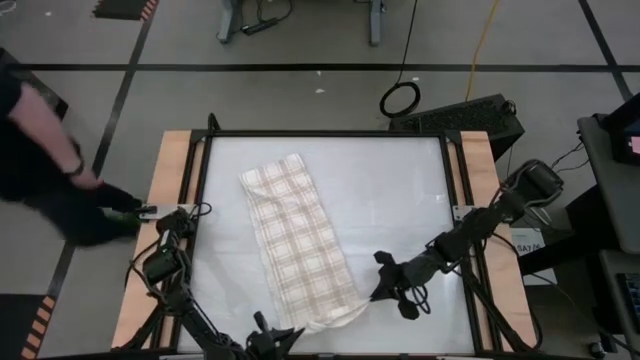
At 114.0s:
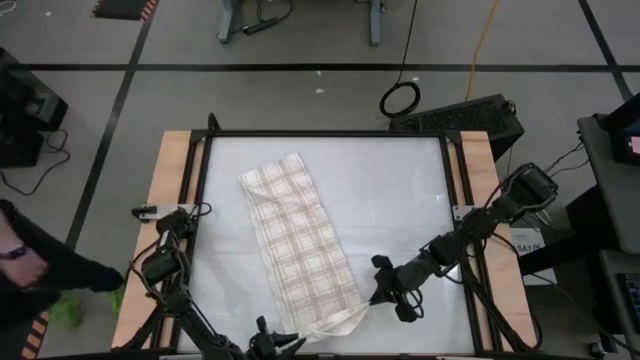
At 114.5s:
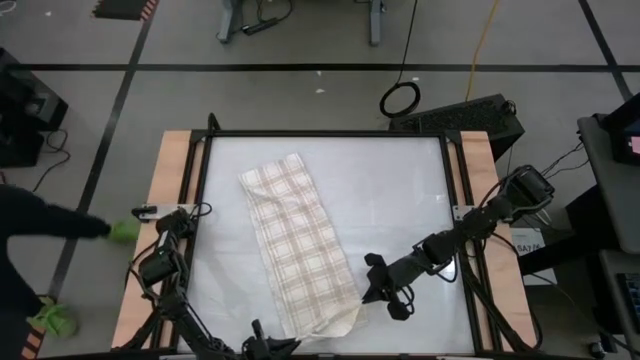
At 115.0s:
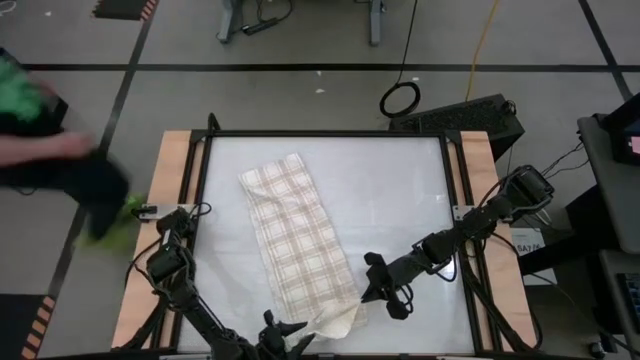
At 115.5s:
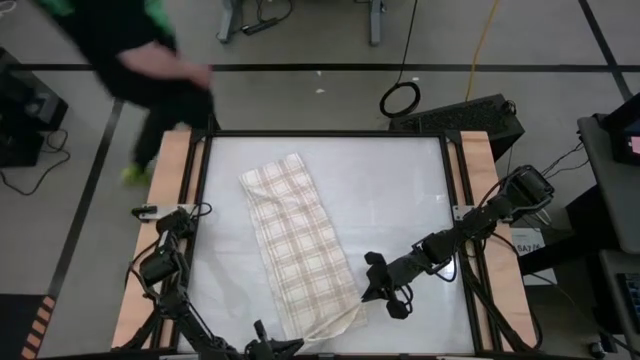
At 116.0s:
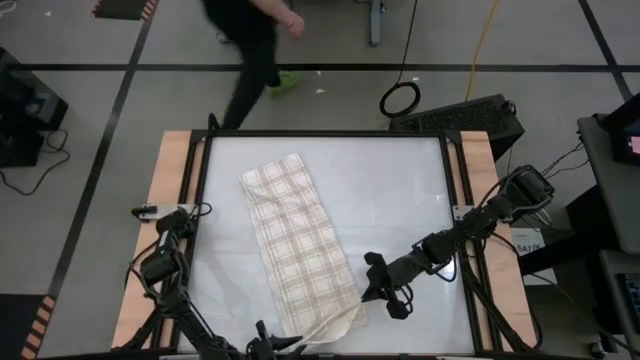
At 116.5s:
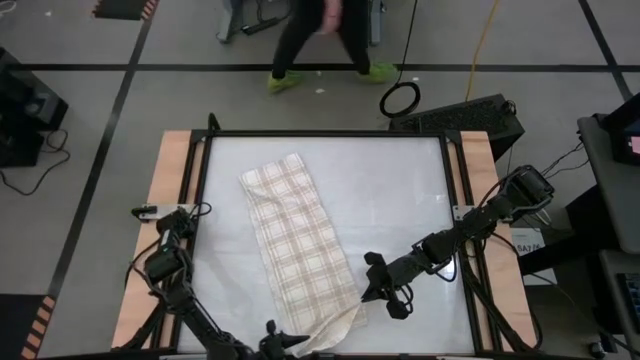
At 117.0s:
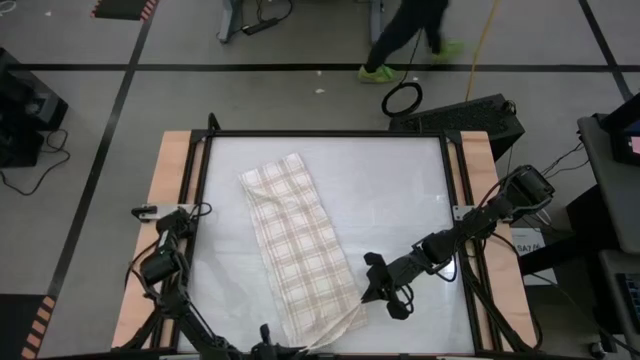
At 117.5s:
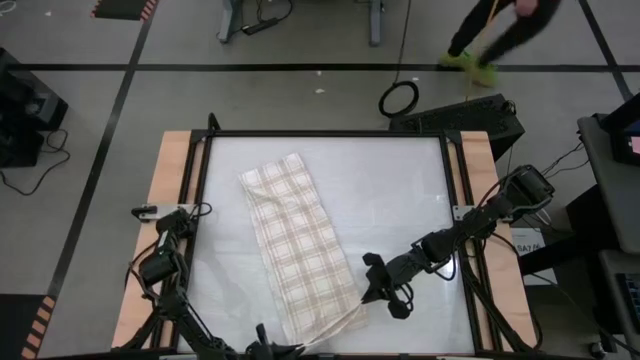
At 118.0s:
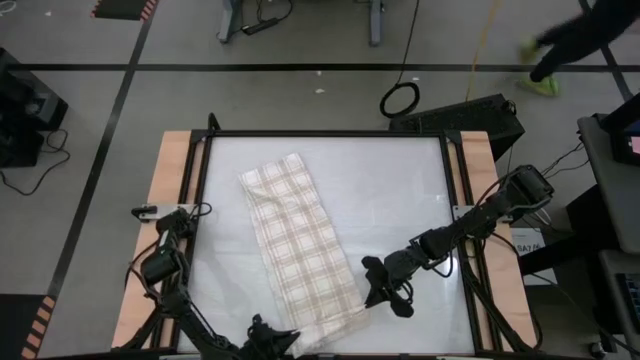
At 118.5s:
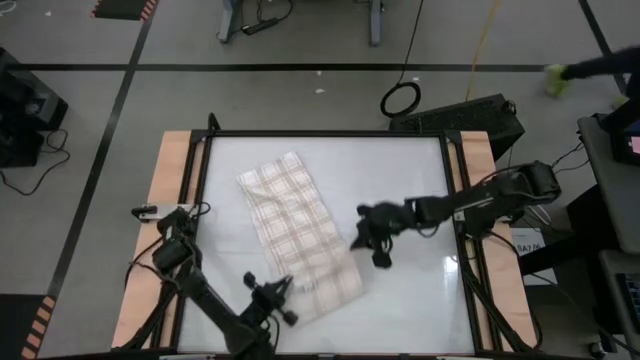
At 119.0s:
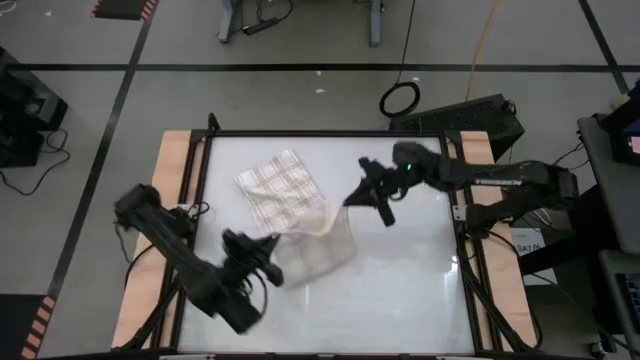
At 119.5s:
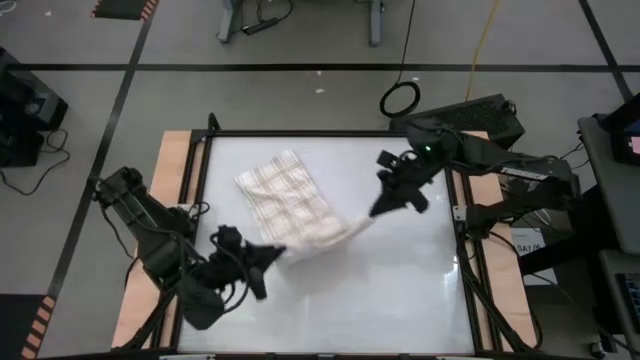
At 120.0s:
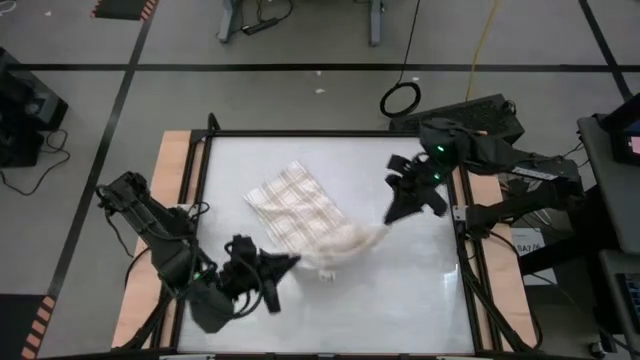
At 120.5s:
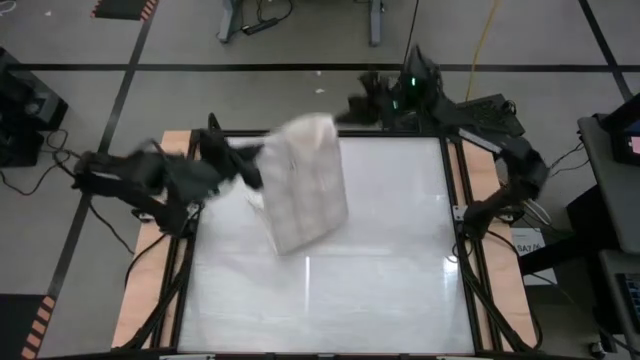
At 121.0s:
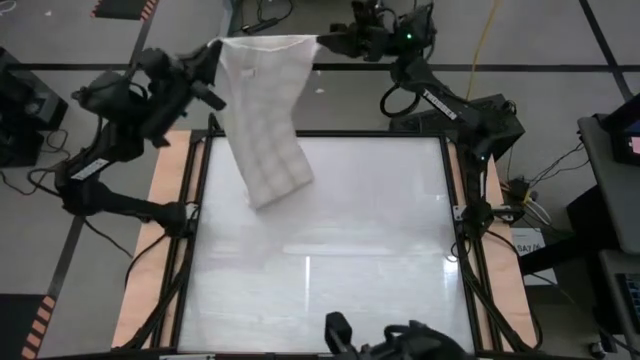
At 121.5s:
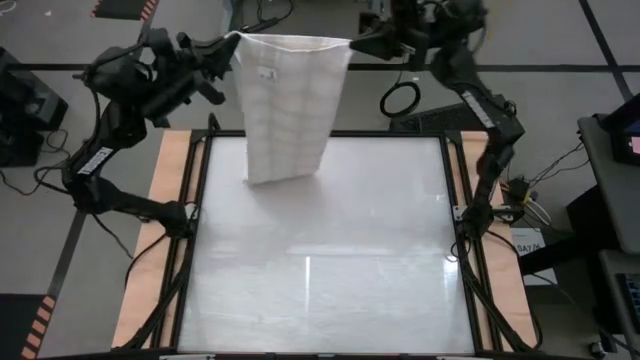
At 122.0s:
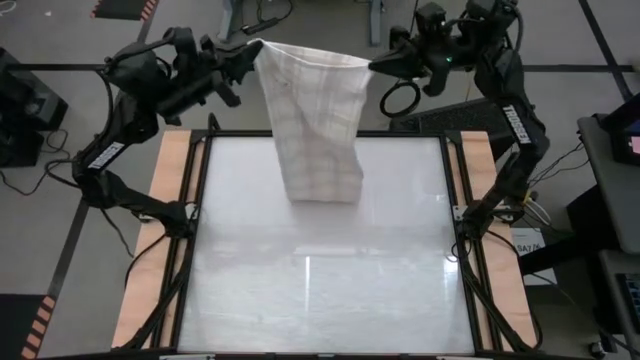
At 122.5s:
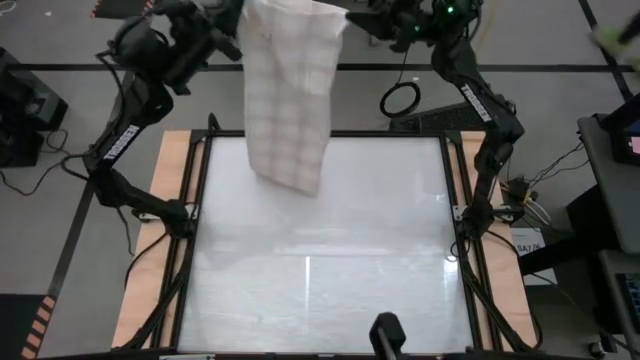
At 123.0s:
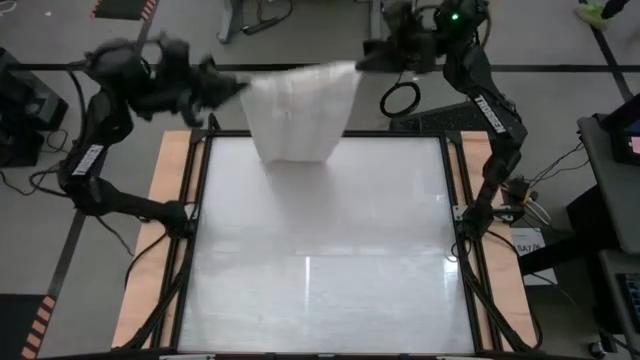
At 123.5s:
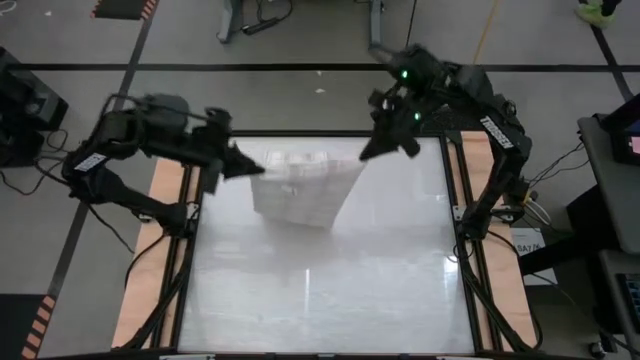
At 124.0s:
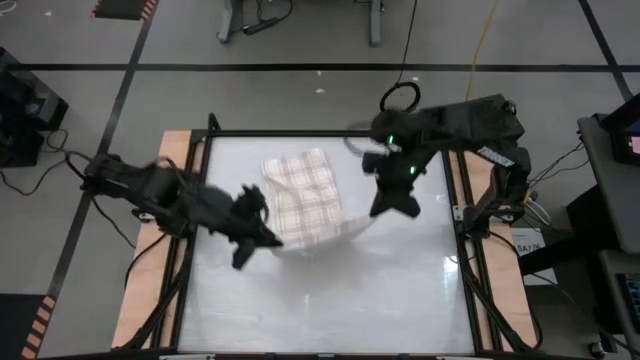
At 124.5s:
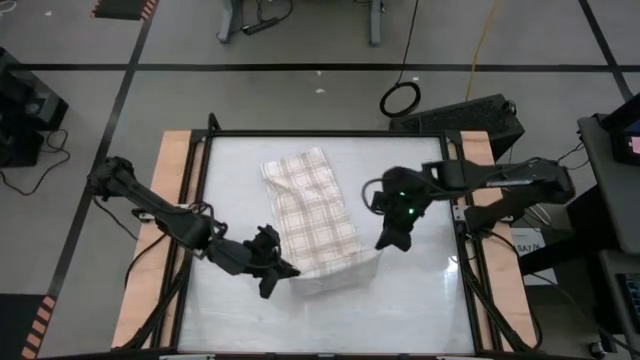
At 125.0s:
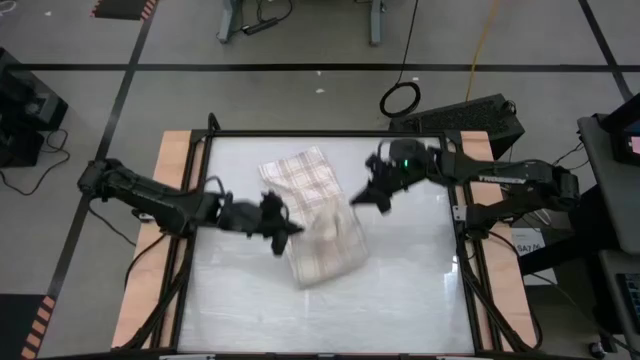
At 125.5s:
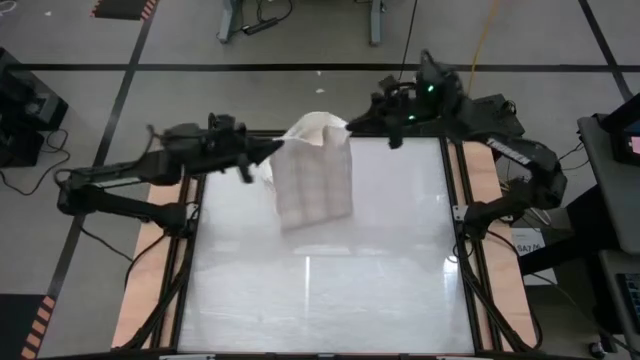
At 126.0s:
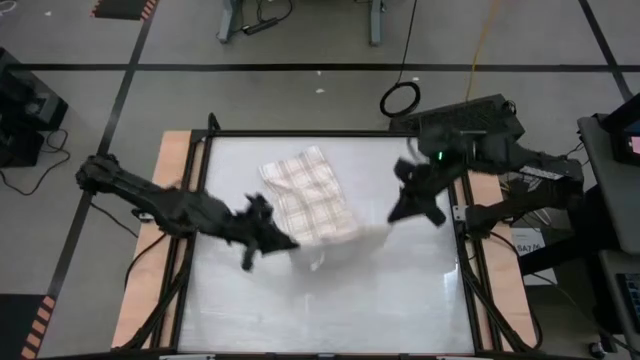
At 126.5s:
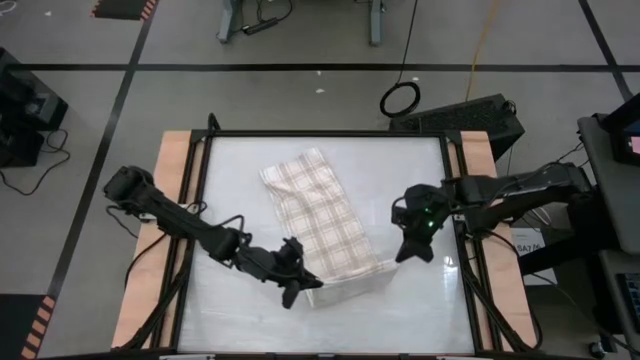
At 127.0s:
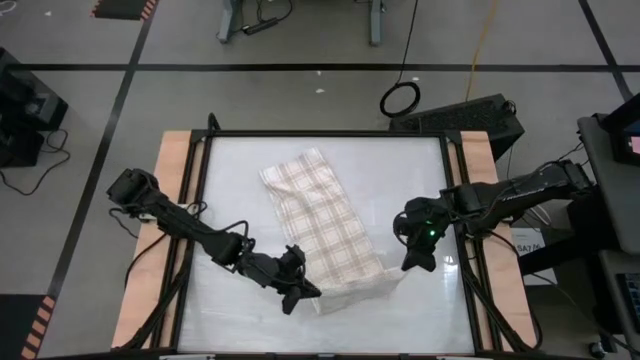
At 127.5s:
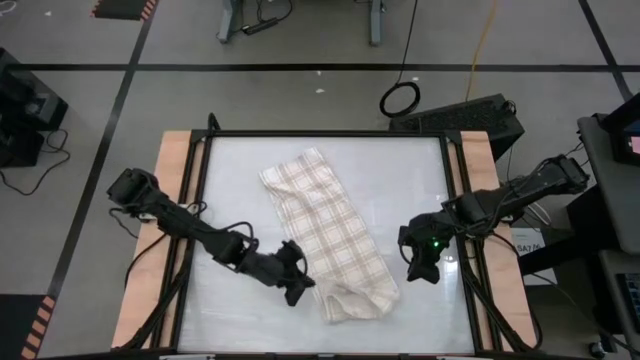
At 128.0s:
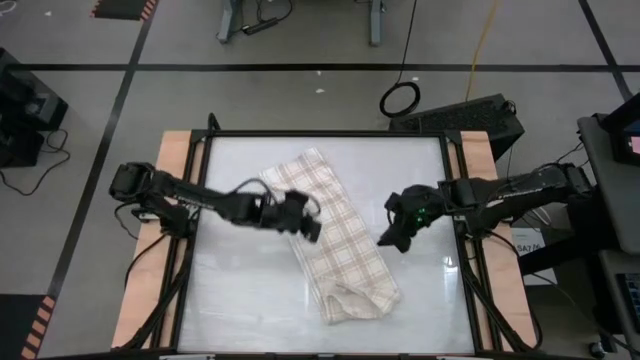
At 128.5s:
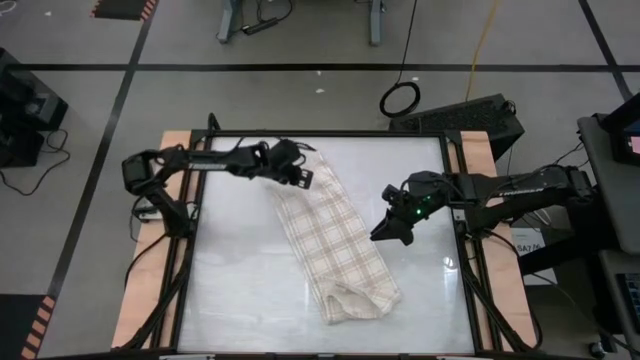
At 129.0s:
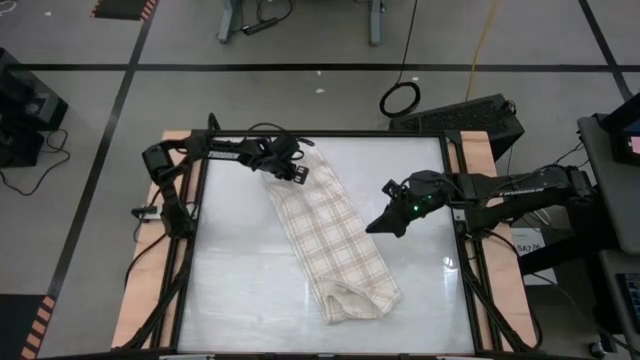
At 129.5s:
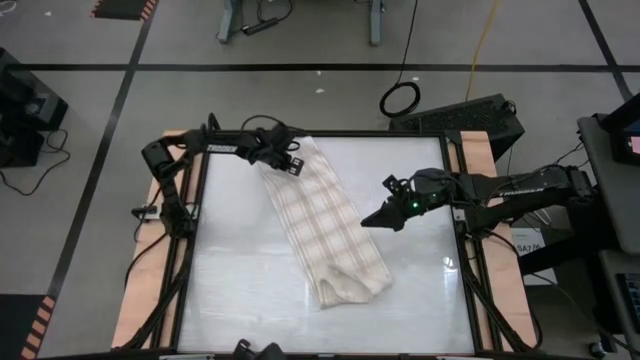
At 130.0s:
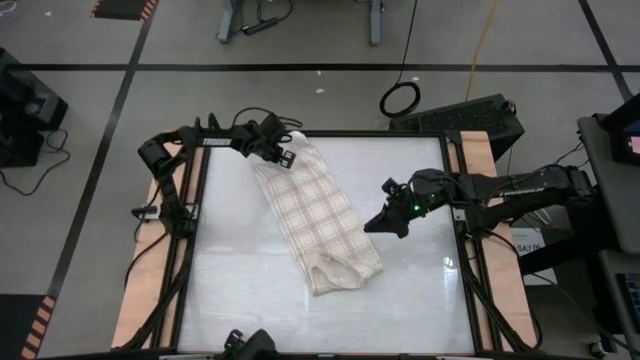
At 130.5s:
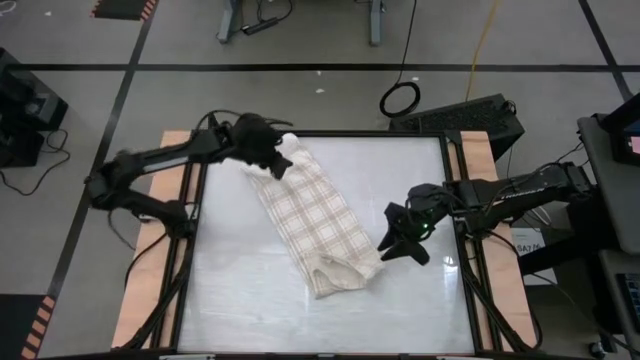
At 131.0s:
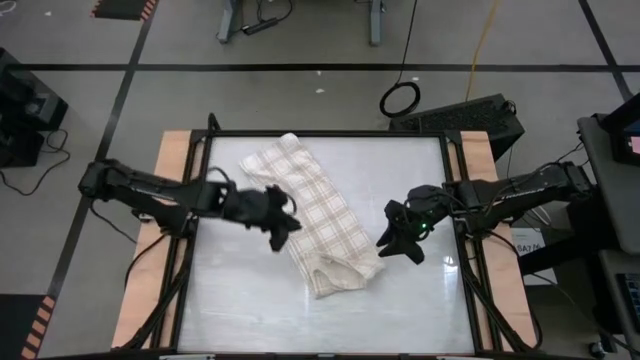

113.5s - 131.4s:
Task: Roll towel
Roll the white-brown patterned towel

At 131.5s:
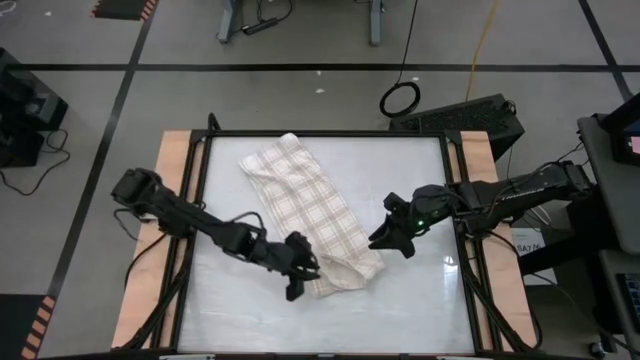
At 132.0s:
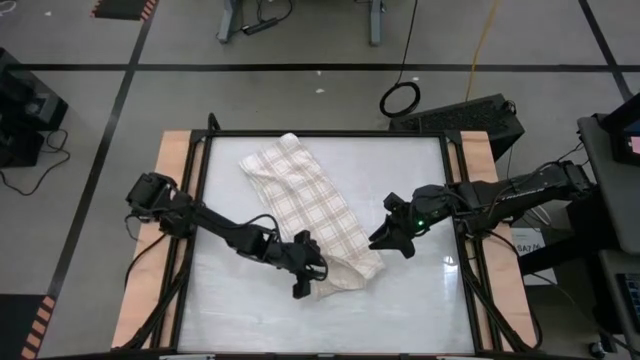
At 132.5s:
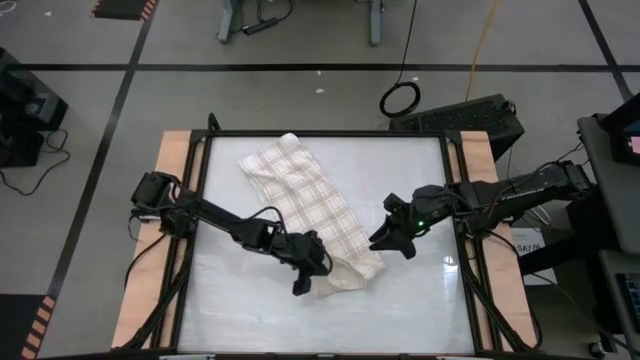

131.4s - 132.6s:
Roll the white-brown patterned towel

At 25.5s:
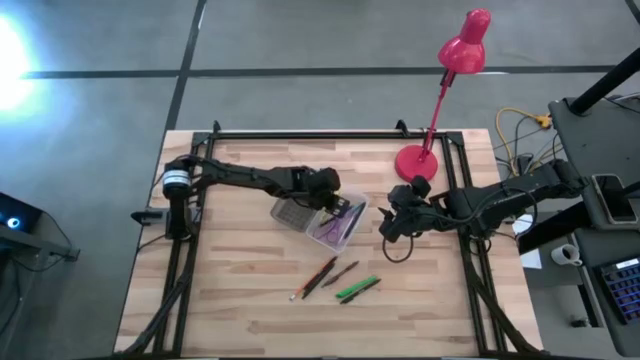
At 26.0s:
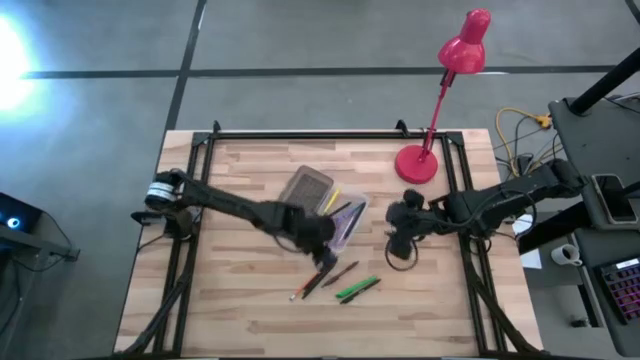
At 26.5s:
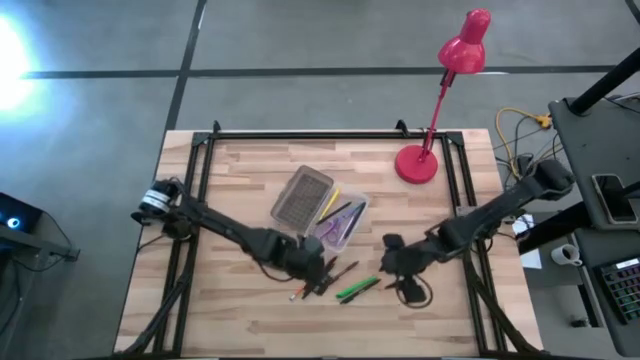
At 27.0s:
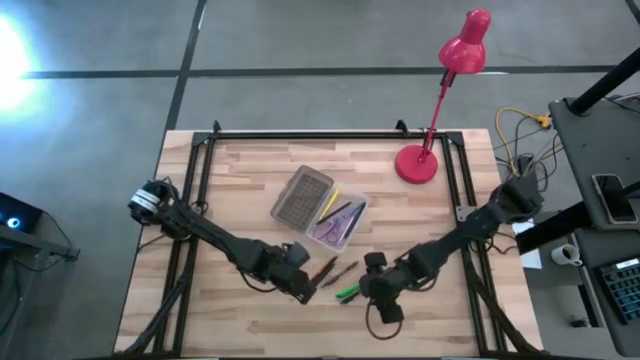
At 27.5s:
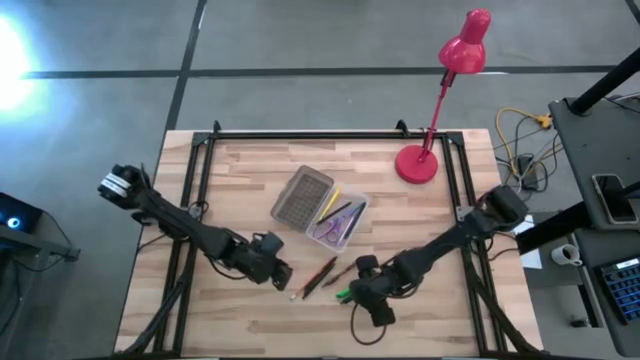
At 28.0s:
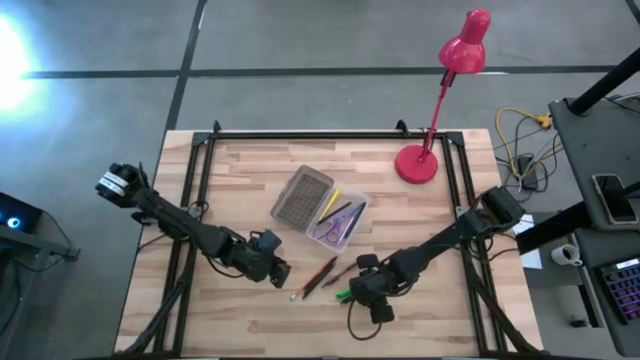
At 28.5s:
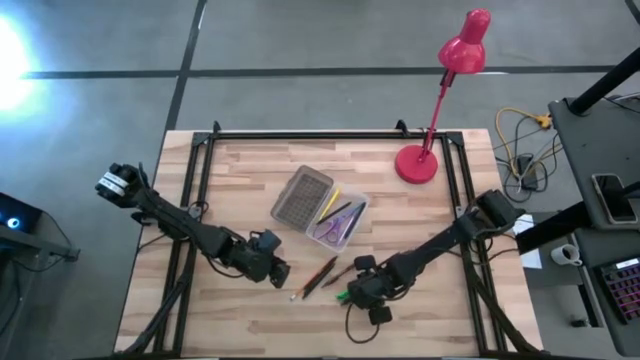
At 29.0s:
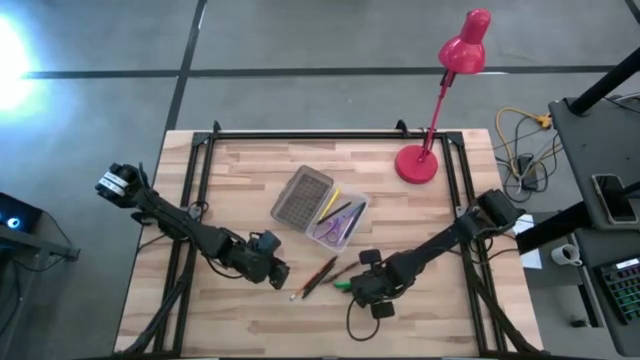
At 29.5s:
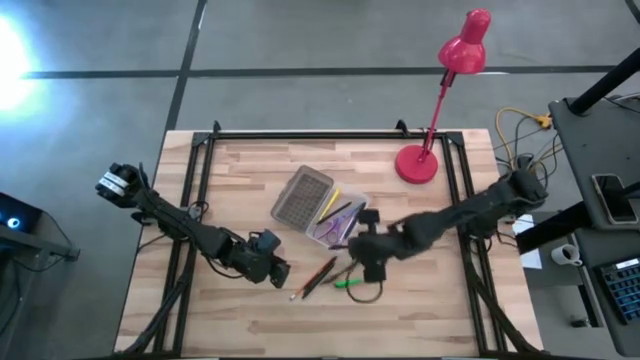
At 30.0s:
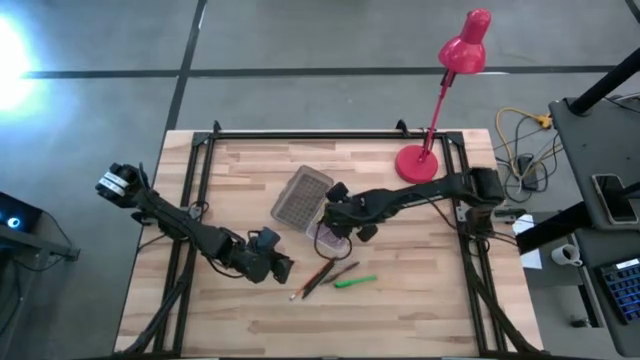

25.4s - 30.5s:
Task: Pick & place school supplies into a supply box
Put the black pen into the gray supply box
